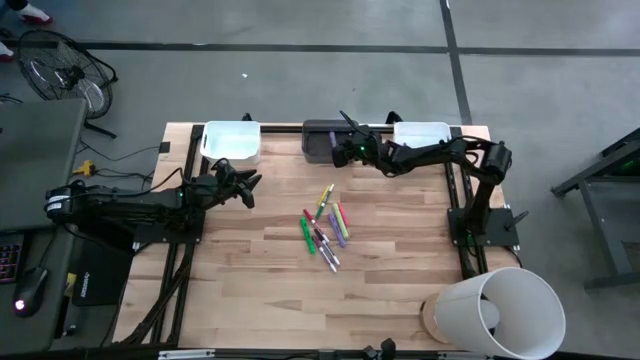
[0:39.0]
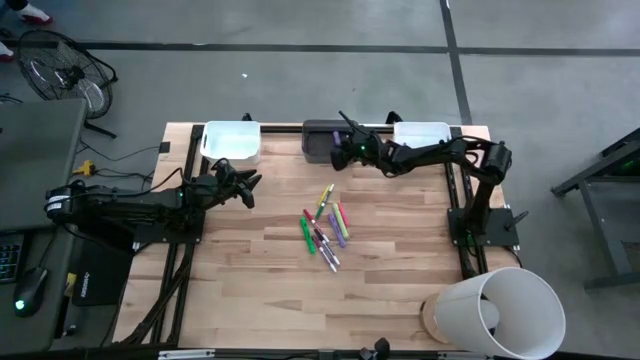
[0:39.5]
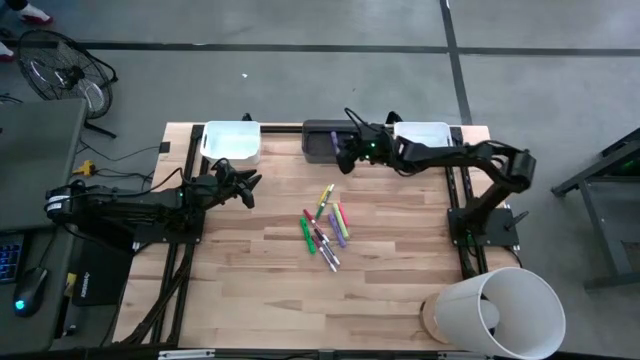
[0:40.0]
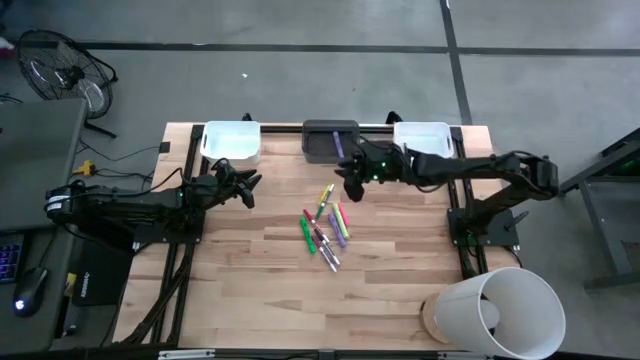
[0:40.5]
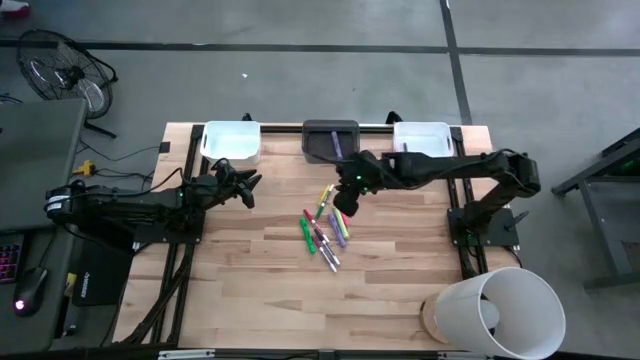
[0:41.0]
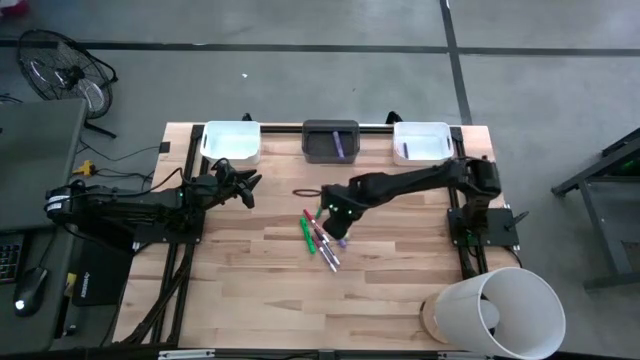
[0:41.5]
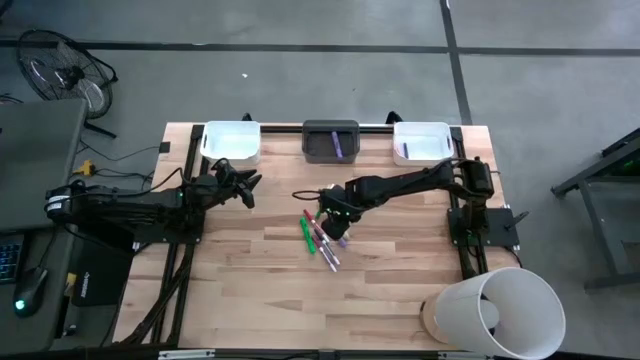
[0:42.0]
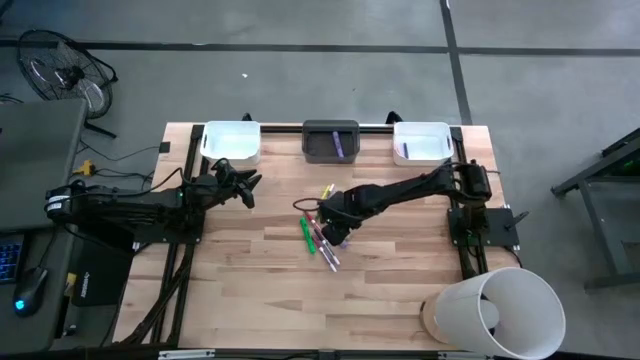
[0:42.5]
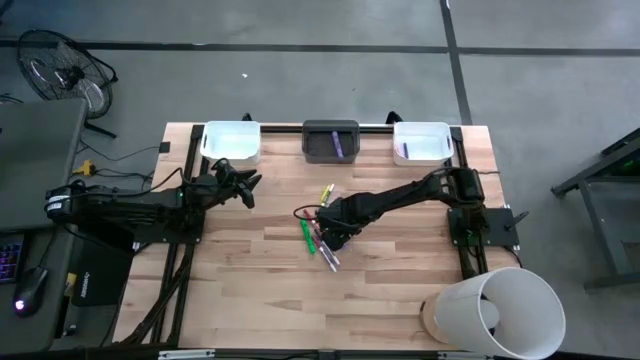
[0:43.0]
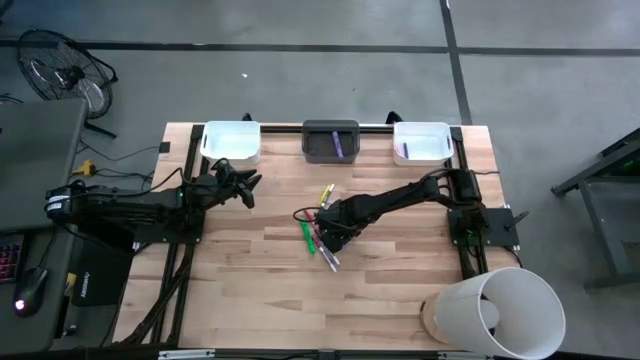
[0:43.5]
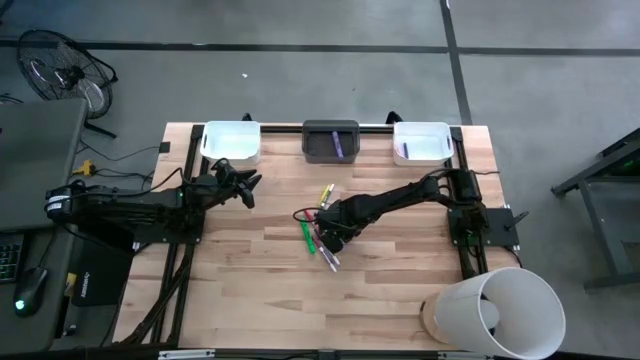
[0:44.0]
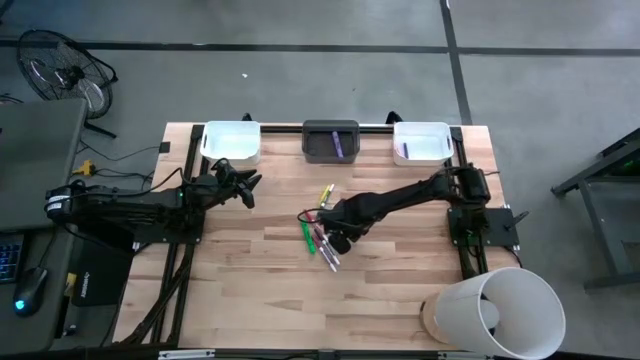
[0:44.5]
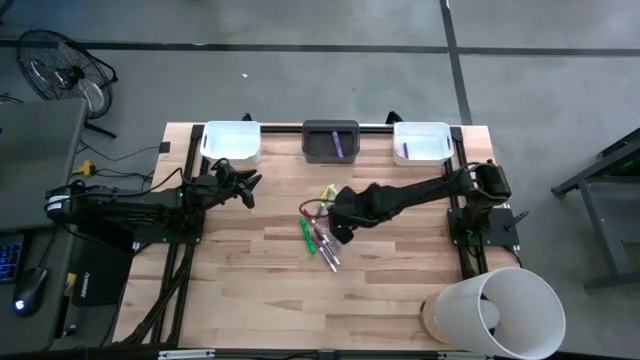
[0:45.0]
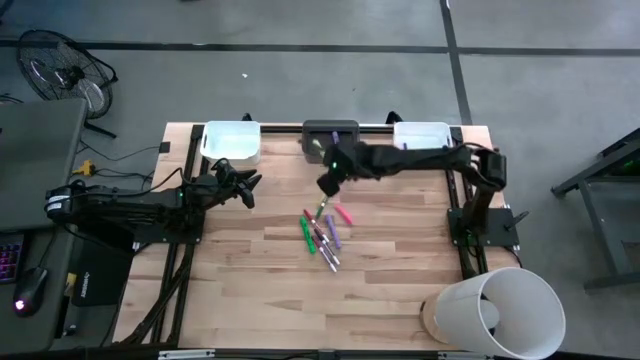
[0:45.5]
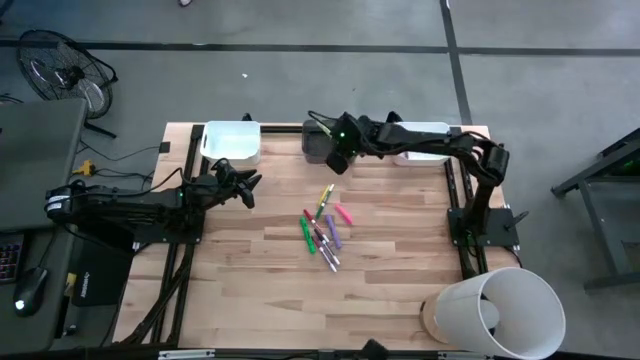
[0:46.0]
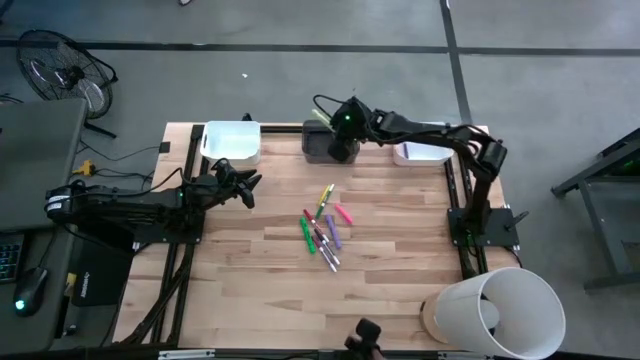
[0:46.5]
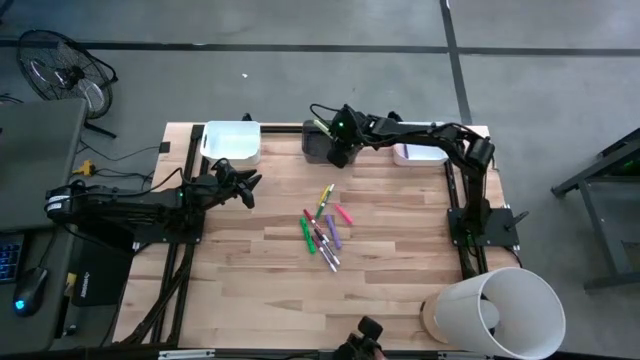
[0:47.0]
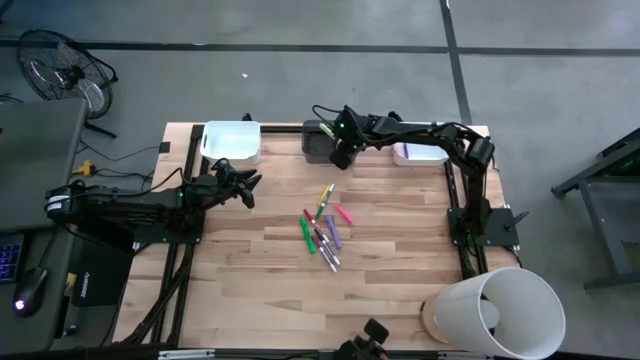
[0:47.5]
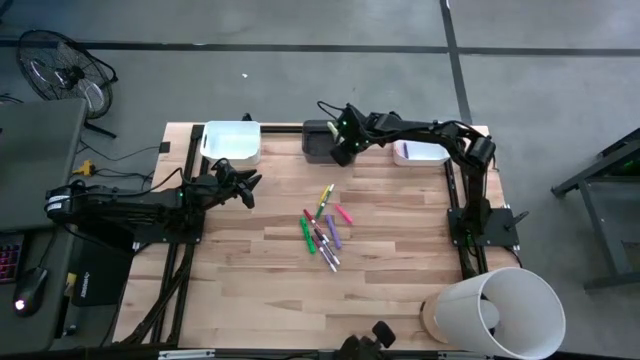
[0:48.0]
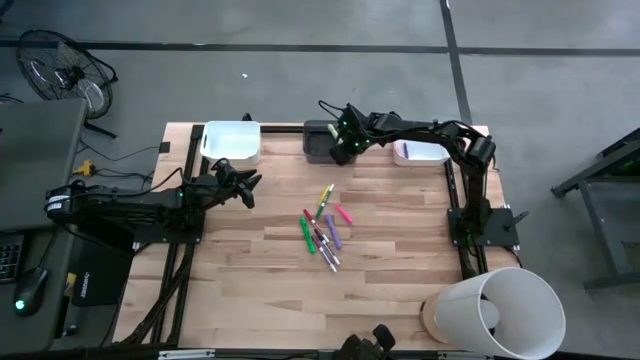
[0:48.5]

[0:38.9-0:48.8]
Task: Pick & Place Markers
Put the light green marker pen into the black bin

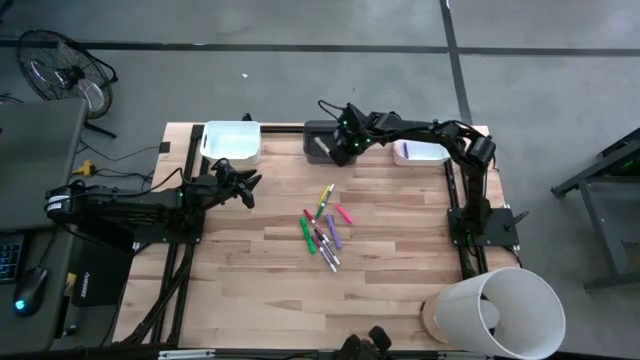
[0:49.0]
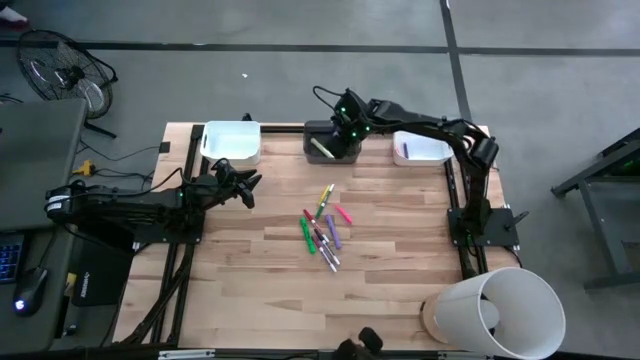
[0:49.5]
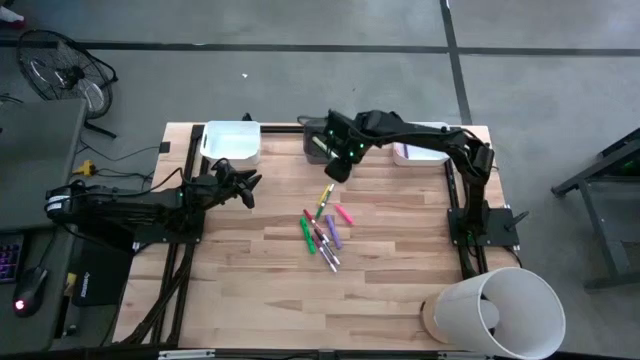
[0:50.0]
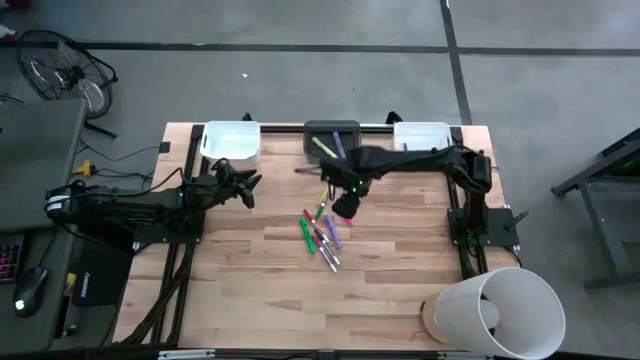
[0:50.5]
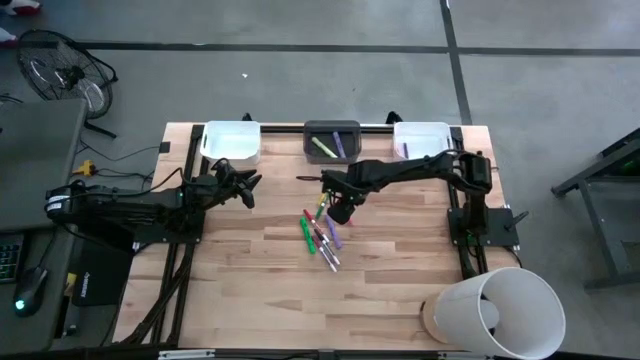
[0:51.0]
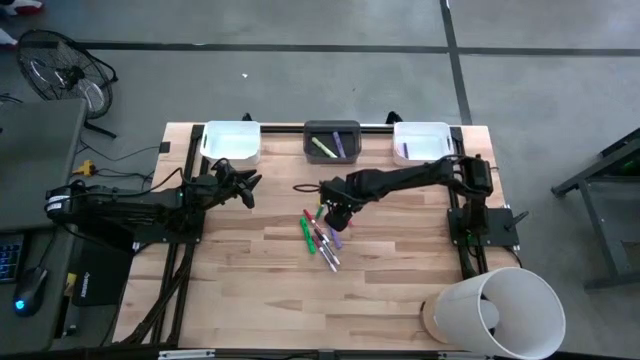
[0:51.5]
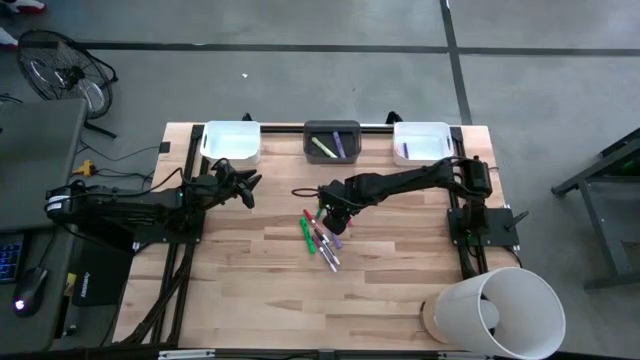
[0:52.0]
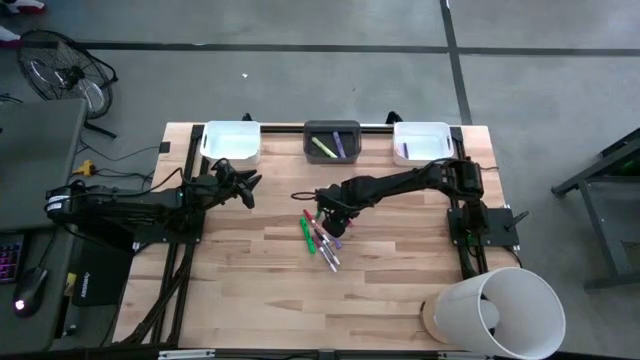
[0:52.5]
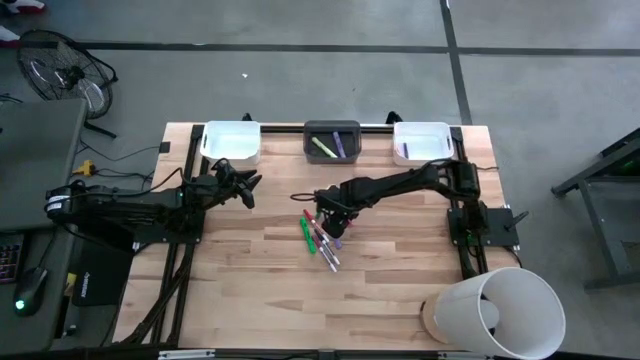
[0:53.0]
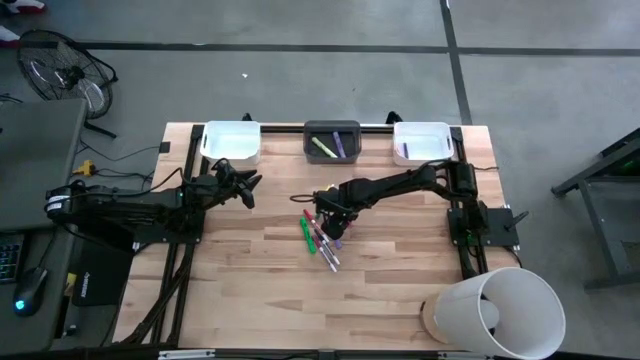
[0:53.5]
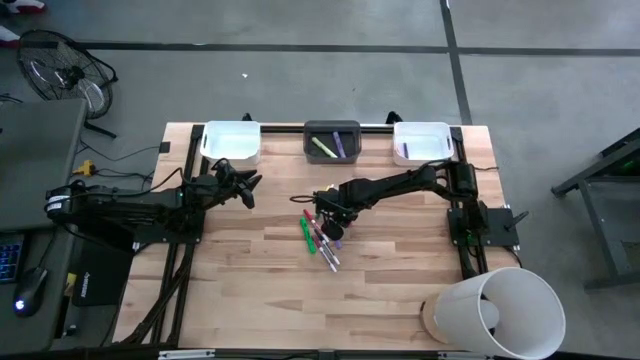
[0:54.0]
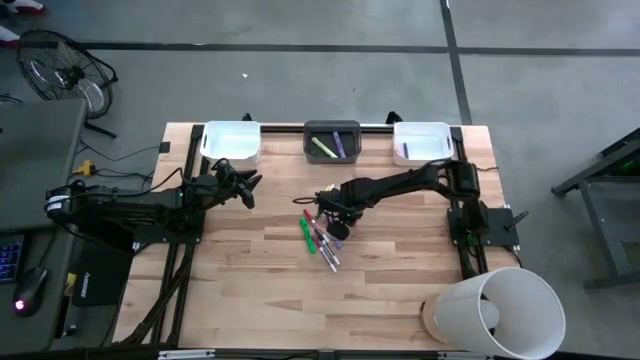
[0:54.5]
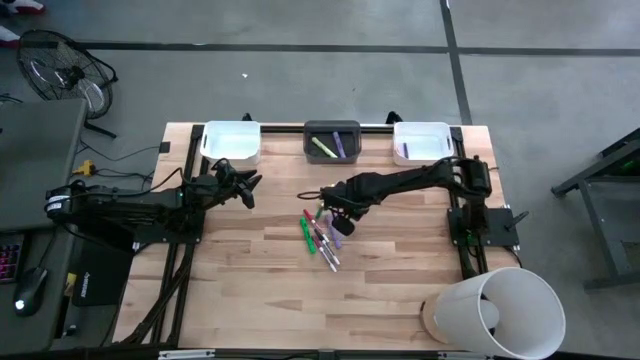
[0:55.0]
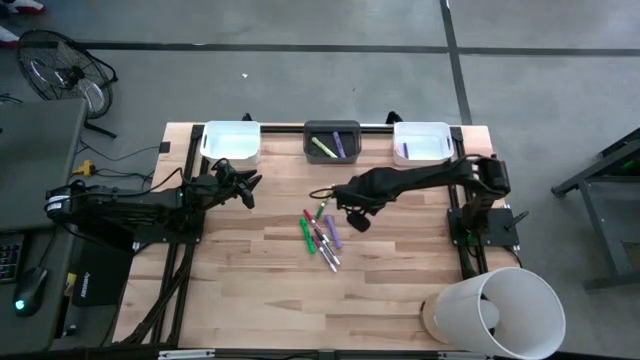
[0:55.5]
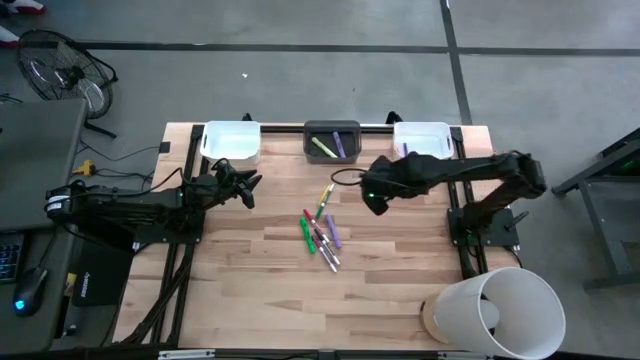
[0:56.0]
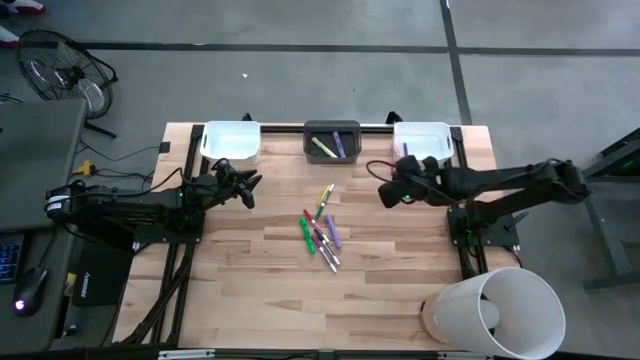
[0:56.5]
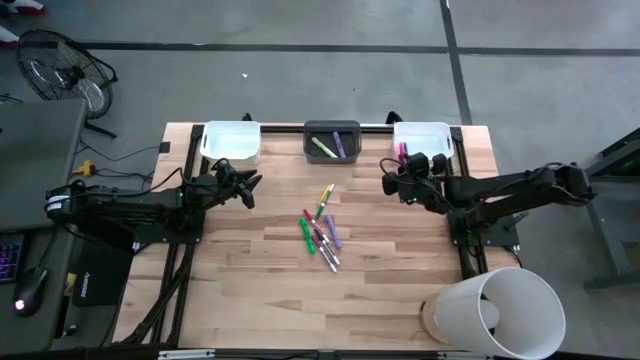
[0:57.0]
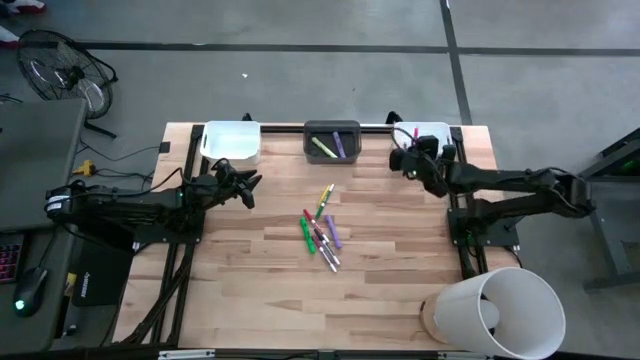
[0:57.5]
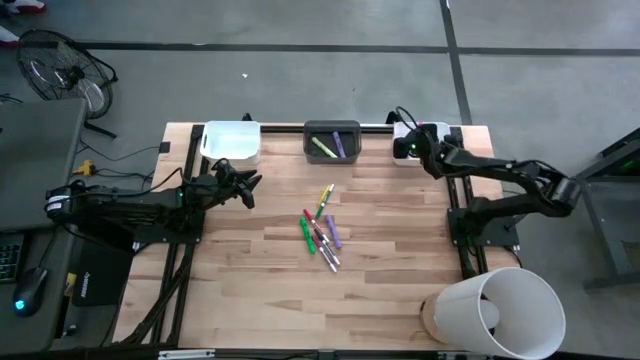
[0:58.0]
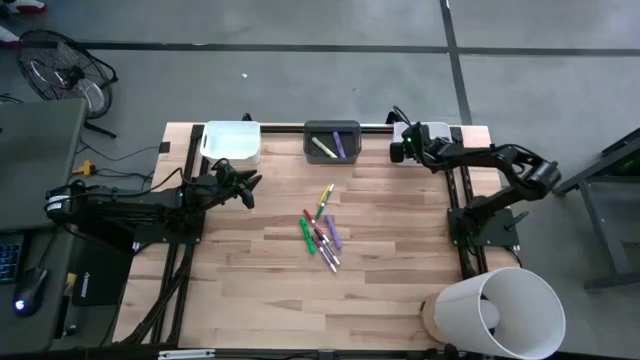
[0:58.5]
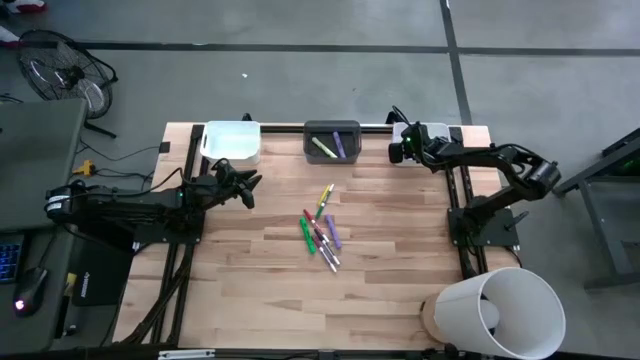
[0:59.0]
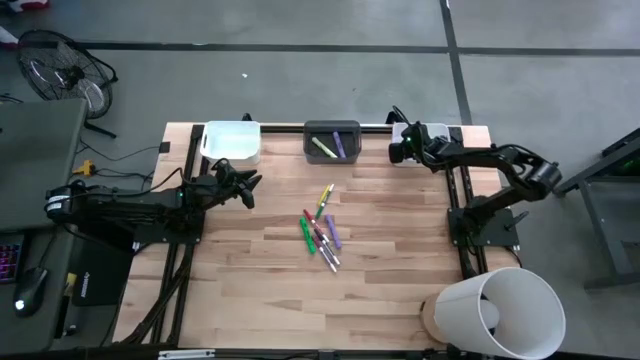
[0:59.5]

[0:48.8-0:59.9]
Put the pink pen into the right white bin

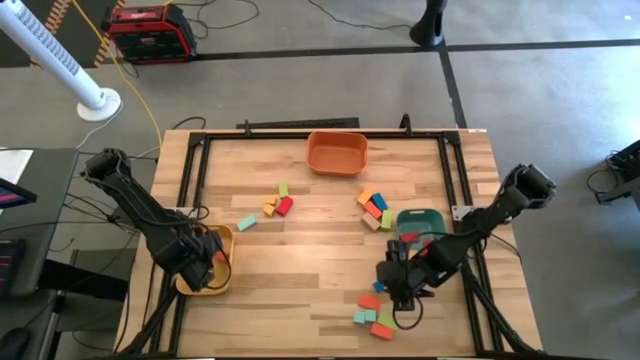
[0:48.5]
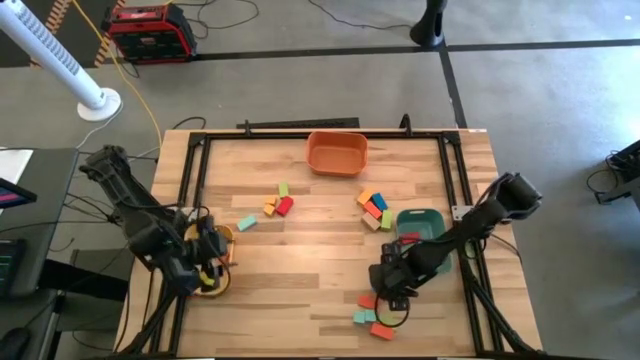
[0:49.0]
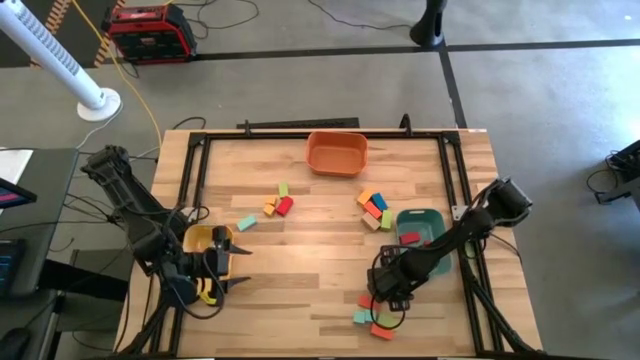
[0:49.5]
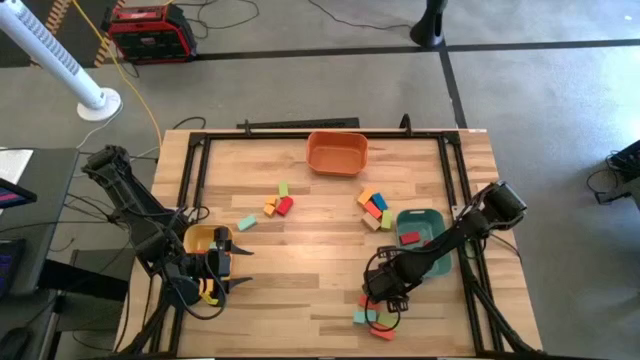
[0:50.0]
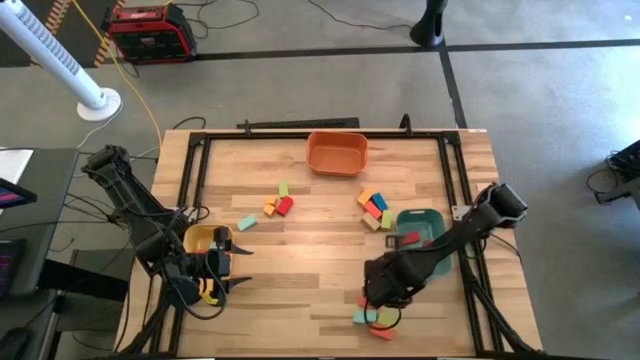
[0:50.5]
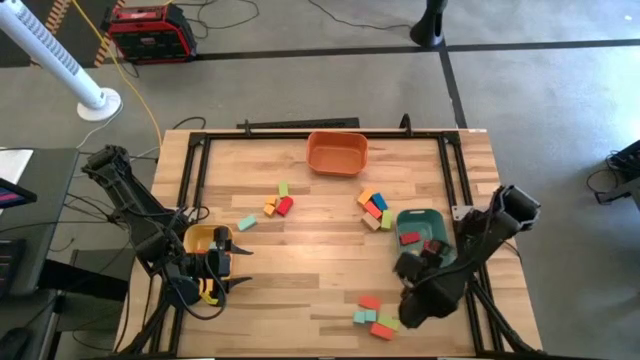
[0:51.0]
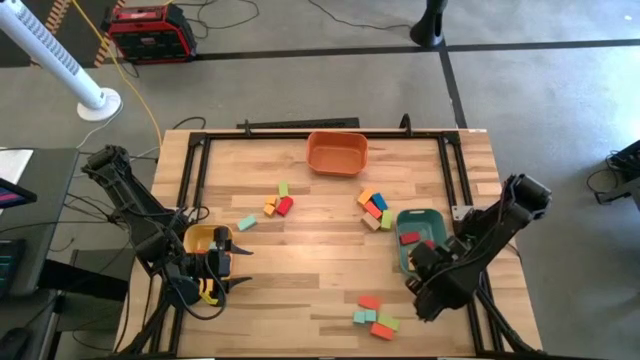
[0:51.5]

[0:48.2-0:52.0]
Task: Sort blocks by size
Put the medium blue block into the green bin
